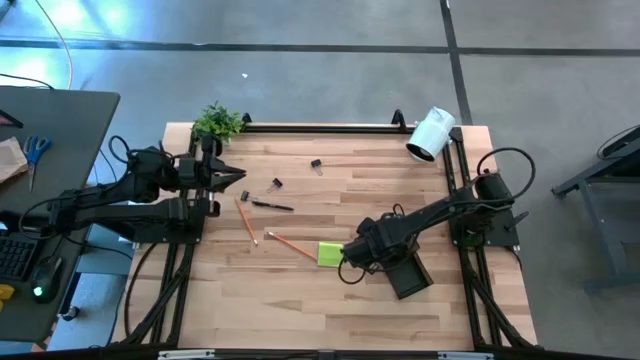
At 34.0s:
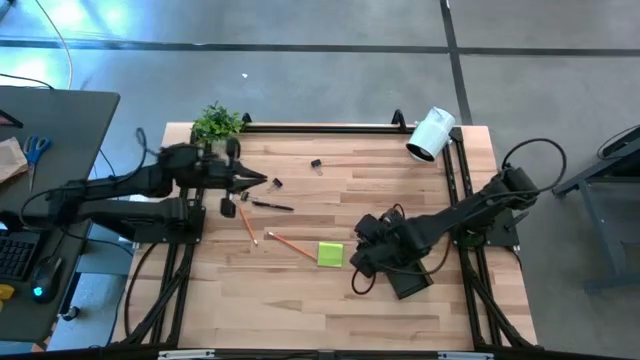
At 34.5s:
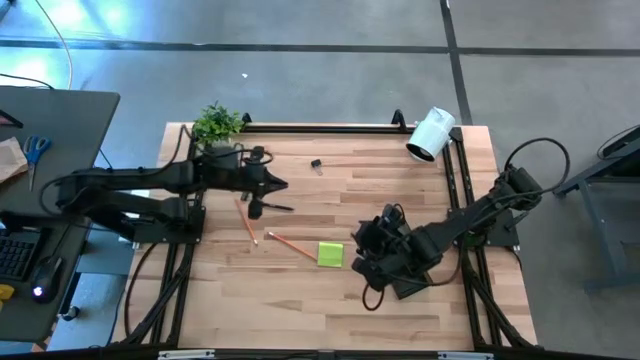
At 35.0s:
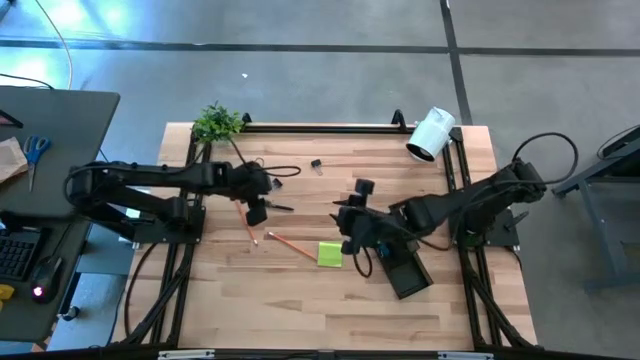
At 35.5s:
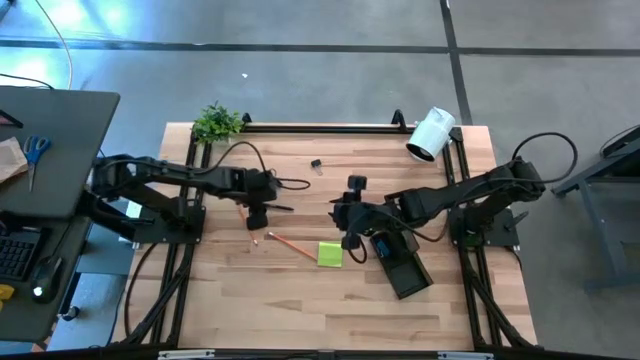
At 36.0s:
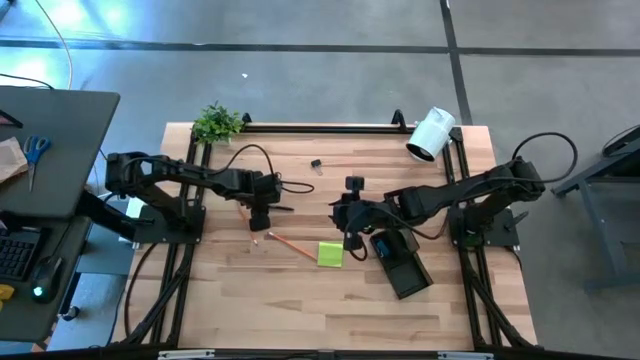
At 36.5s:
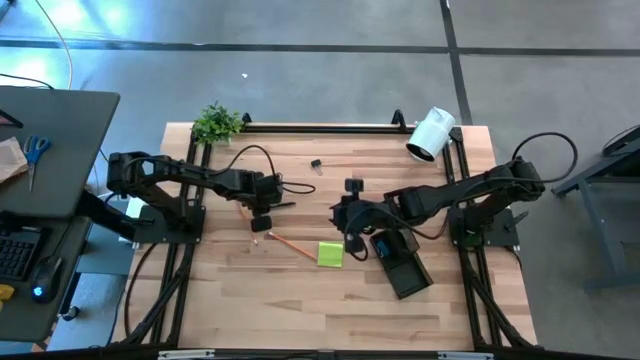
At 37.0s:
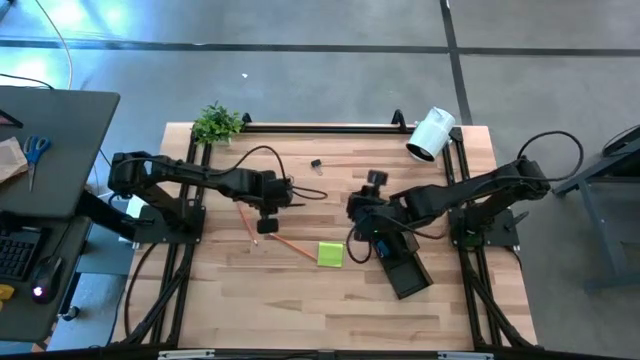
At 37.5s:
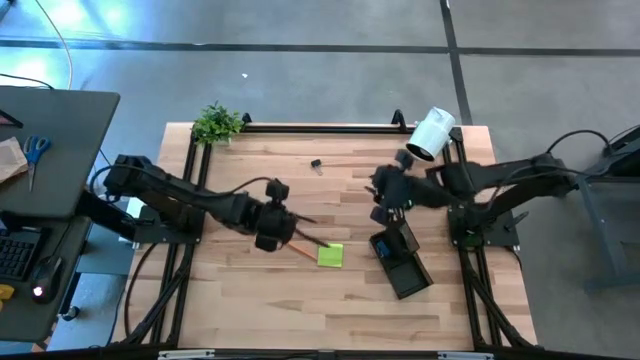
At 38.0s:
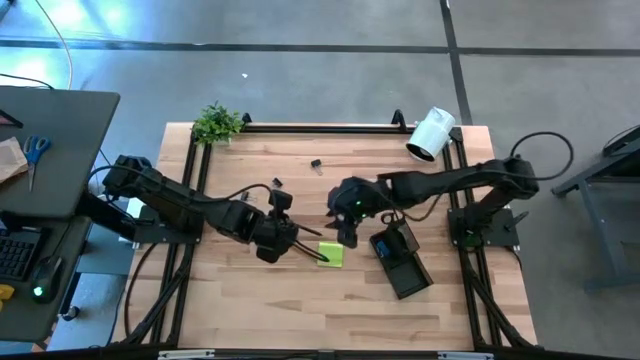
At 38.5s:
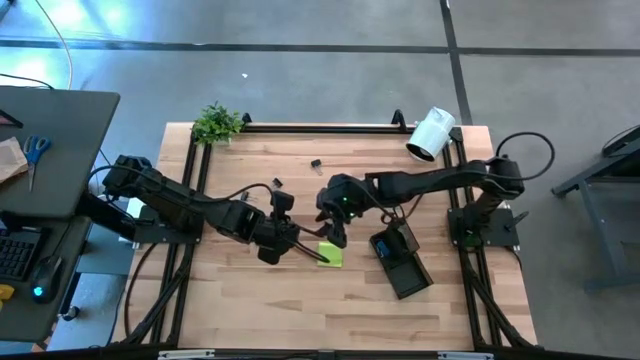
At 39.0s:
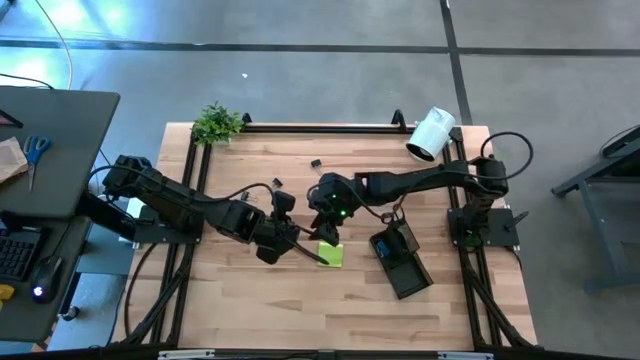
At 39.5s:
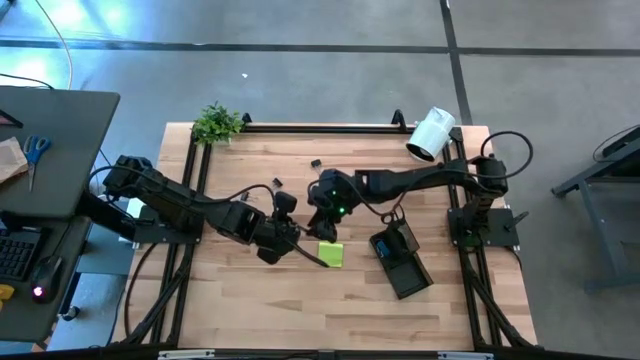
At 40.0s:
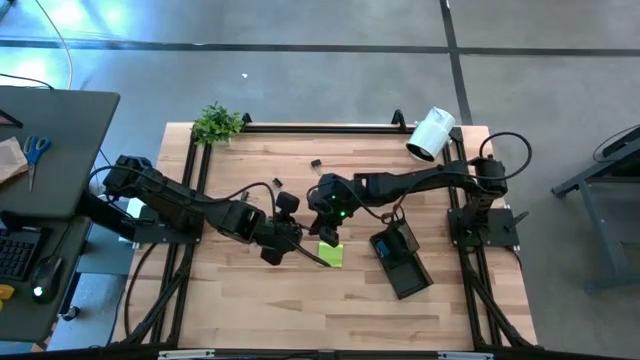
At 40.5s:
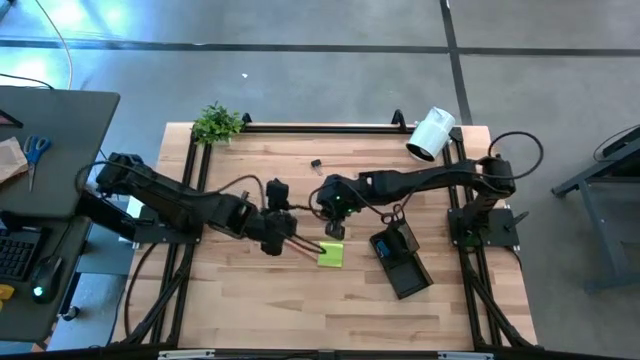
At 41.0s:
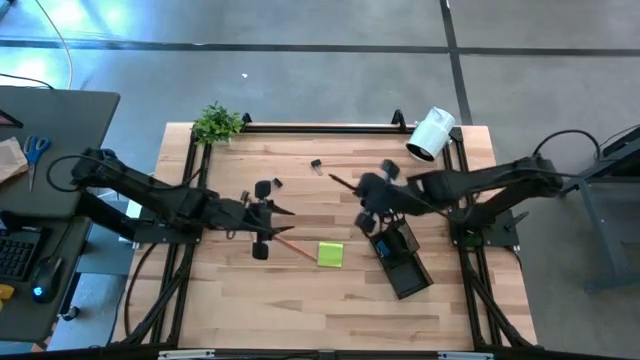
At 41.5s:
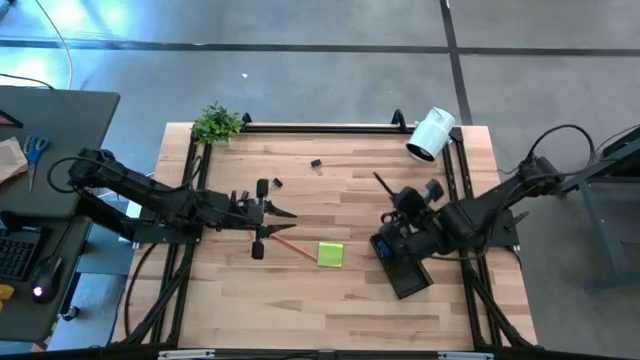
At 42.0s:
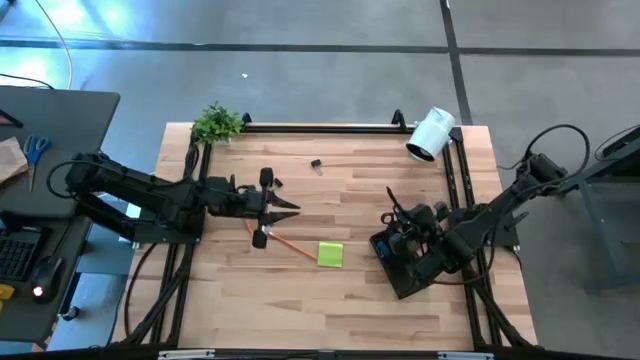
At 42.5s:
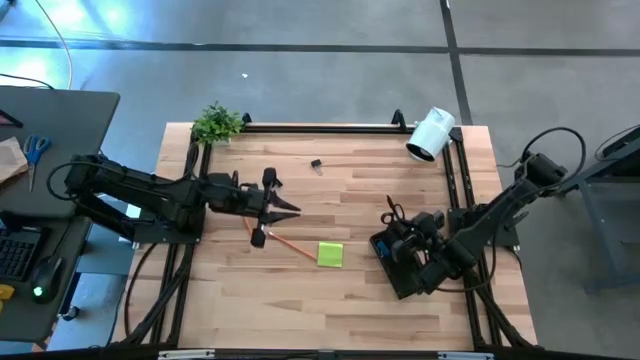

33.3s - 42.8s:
Task: Pick and place office supplies into organizer
Put the black pen into the black desk organizer

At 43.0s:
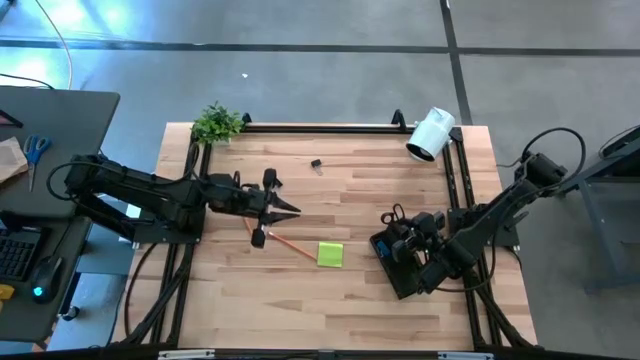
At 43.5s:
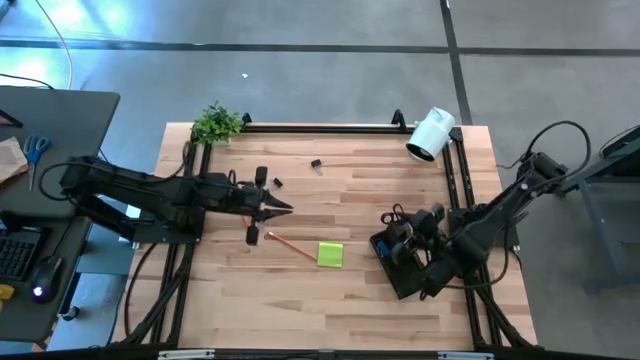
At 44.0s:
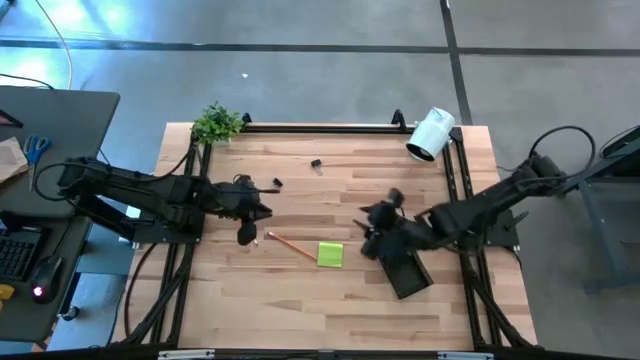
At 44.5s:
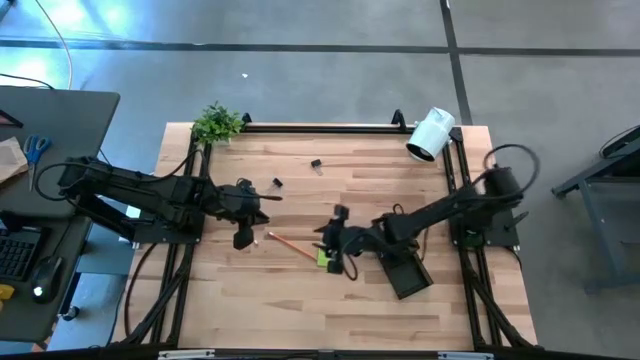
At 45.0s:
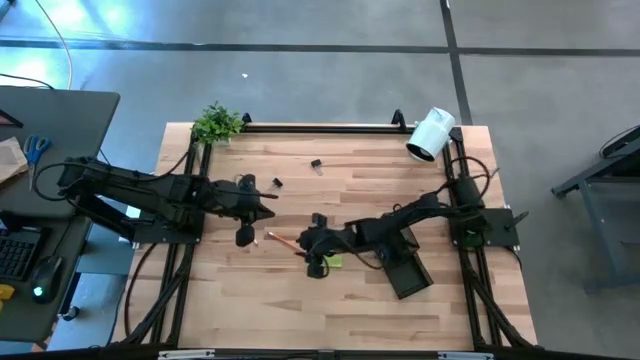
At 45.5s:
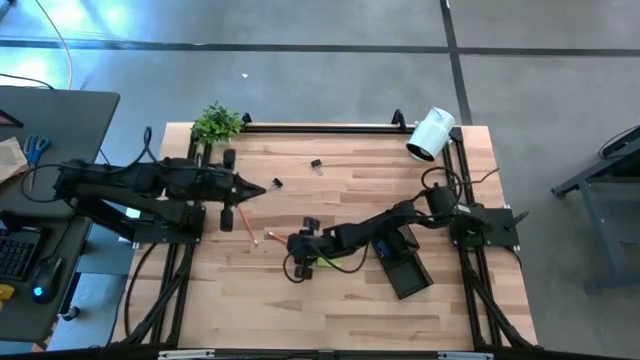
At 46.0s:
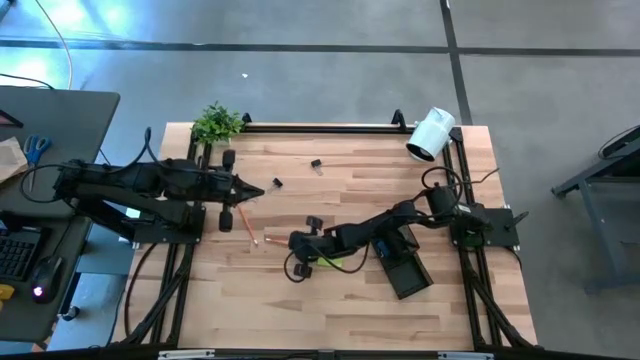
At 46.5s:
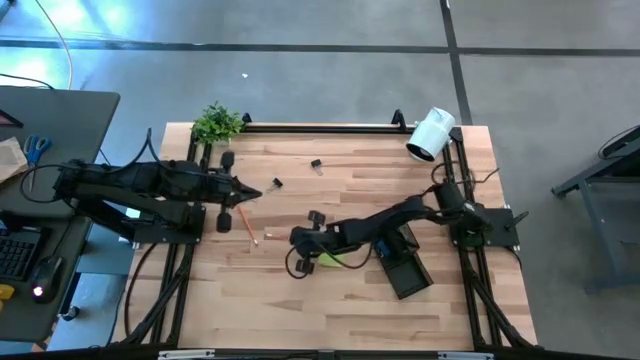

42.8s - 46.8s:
Put the orange pencil into the black desk organizer

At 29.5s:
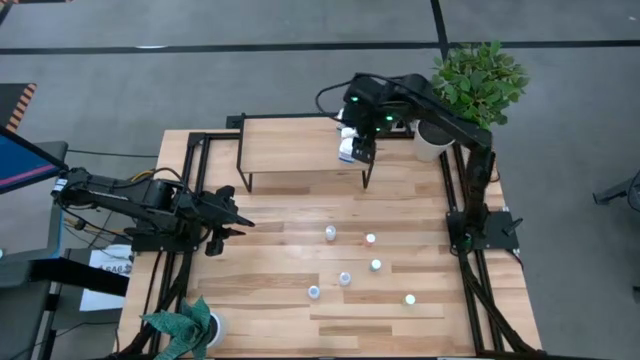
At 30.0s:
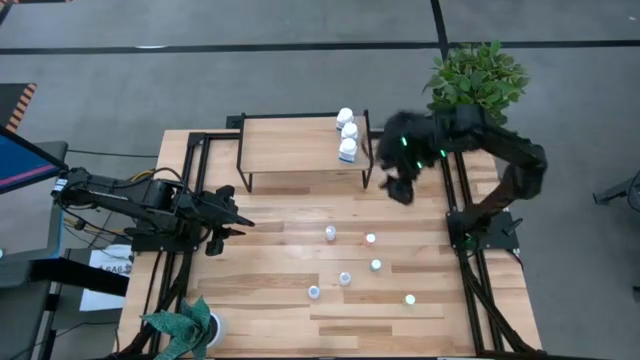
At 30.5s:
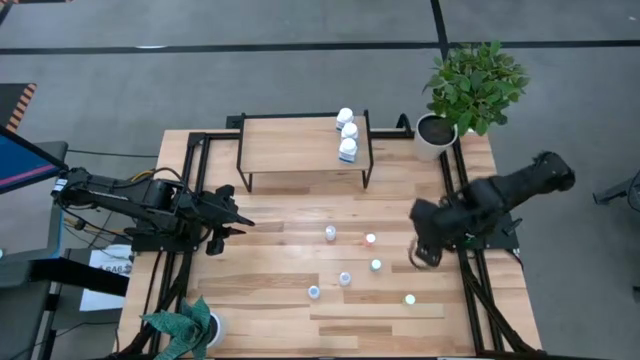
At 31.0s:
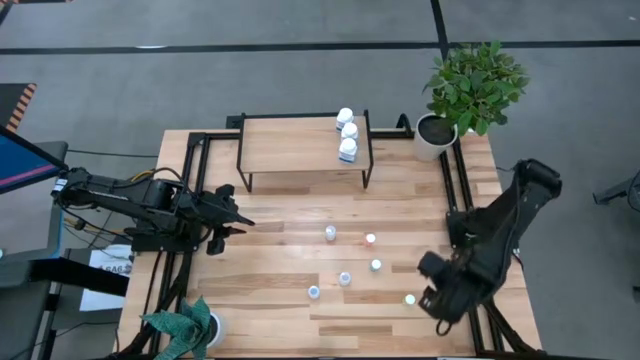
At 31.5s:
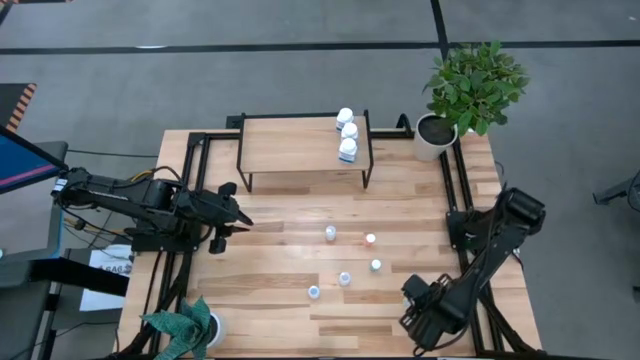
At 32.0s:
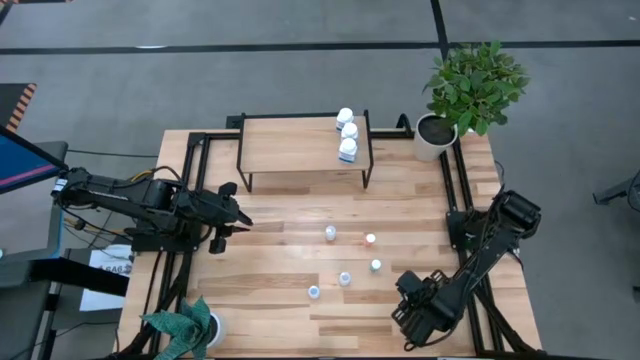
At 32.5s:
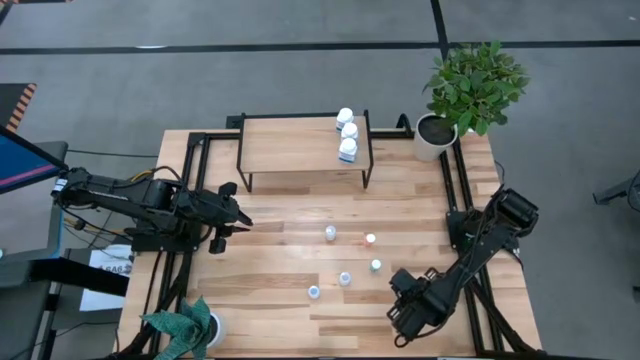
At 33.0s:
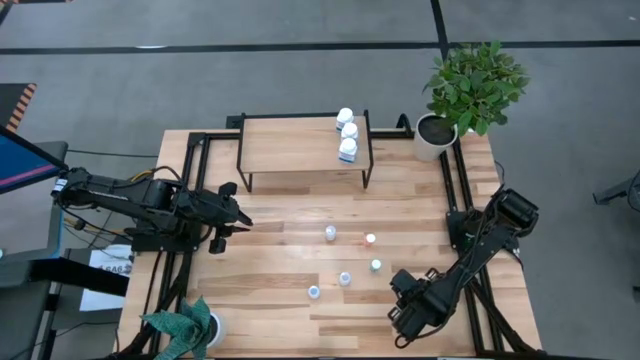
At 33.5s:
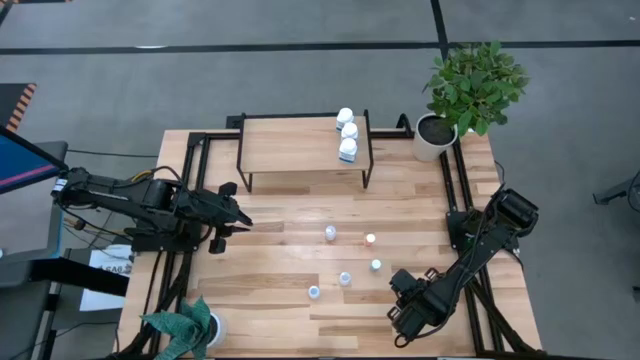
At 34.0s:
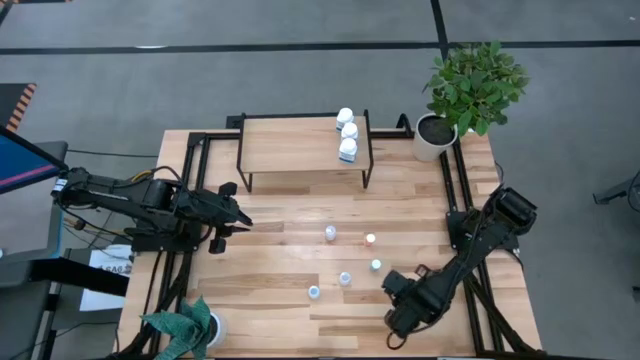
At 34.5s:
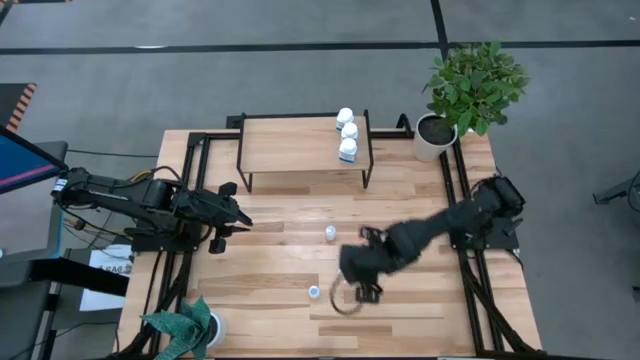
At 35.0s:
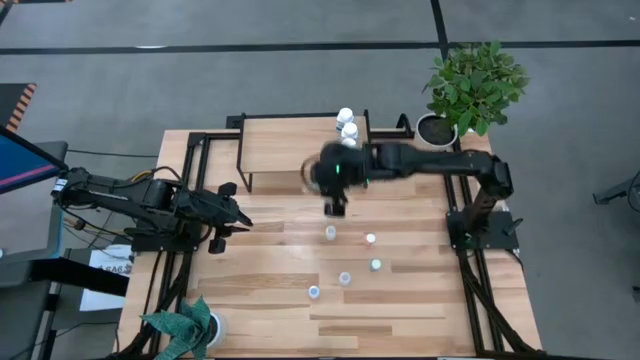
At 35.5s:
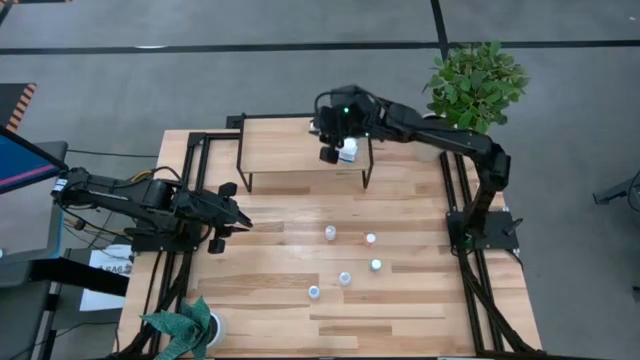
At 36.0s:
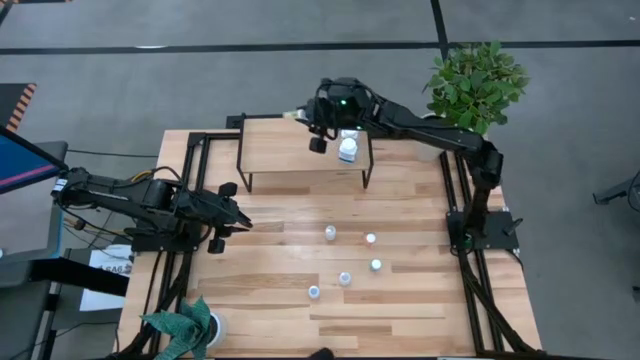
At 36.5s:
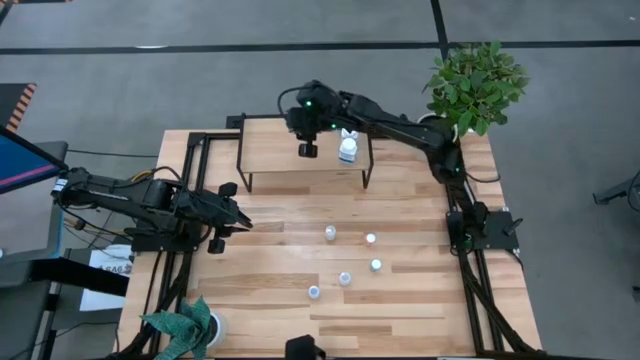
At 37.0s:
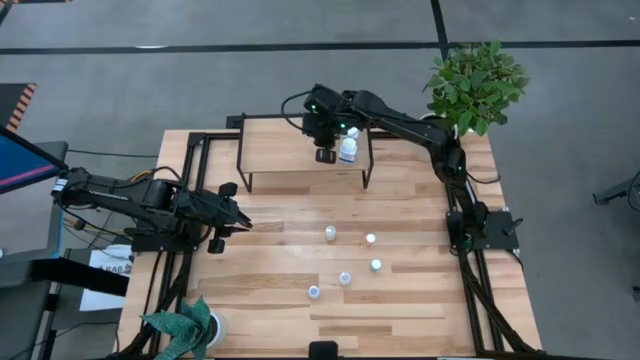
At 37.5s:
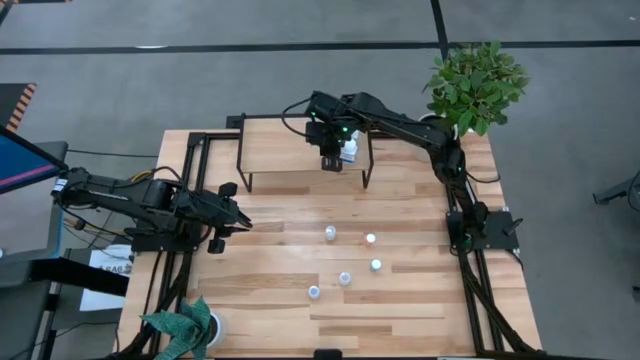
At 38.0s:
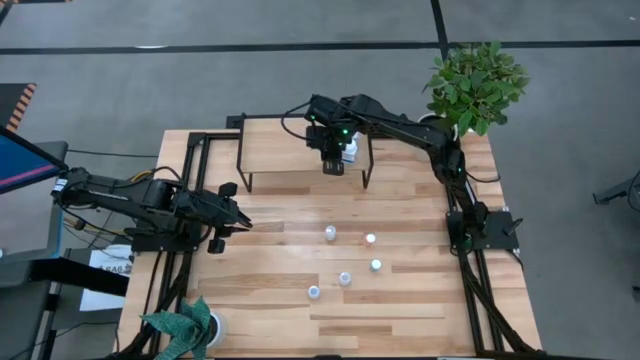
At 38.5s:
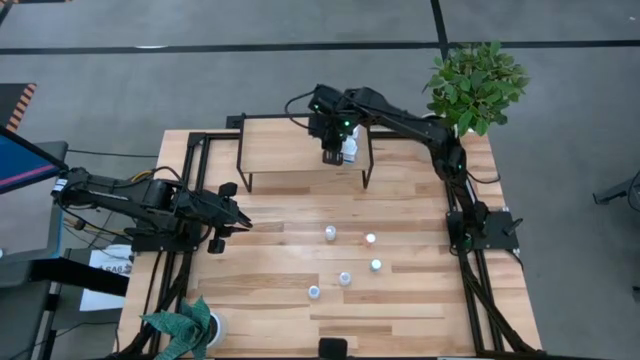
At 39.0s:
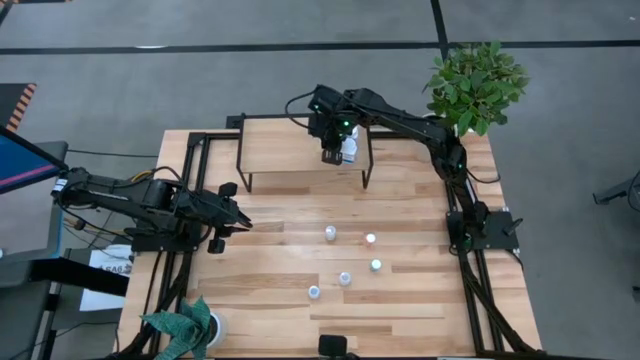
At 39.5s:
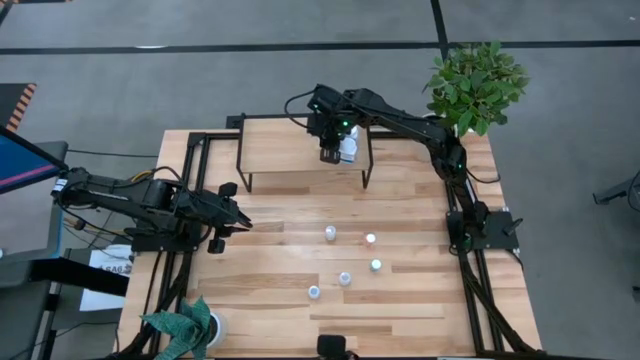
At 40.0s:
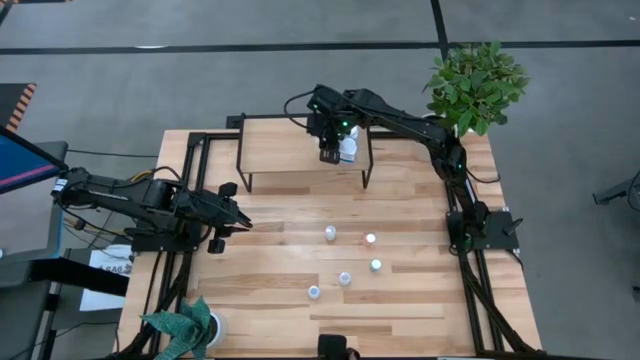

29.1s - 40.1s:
Task: Pick and place medicine bottles onto shelf by color
Put the yellow pill bottle on the shelf
